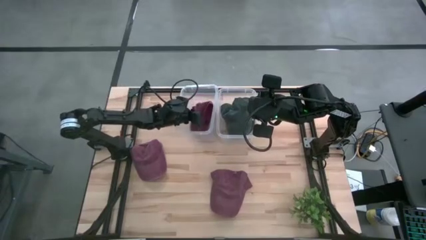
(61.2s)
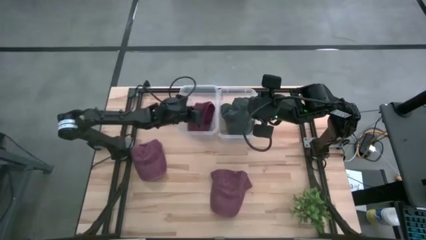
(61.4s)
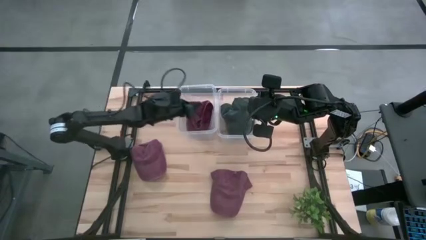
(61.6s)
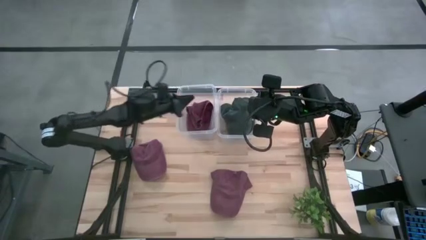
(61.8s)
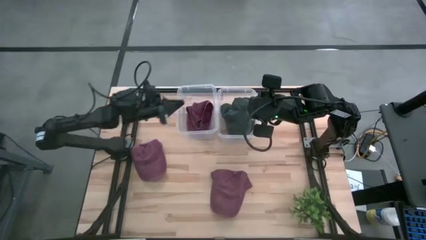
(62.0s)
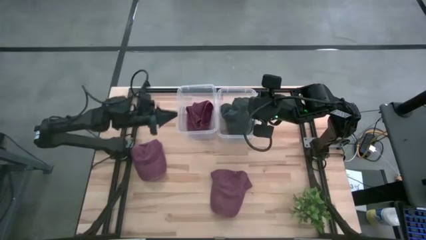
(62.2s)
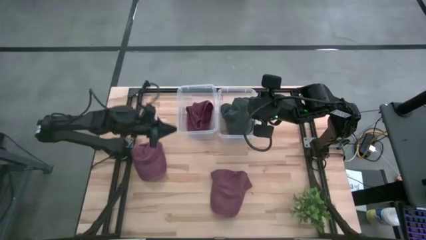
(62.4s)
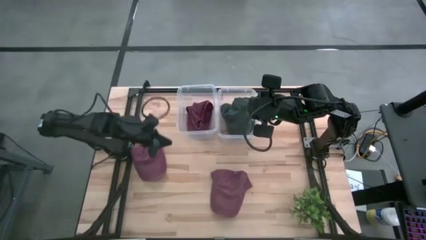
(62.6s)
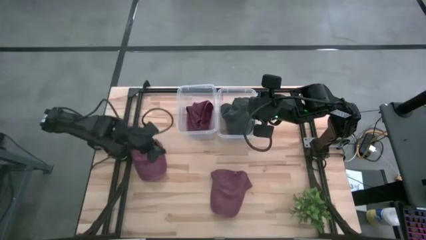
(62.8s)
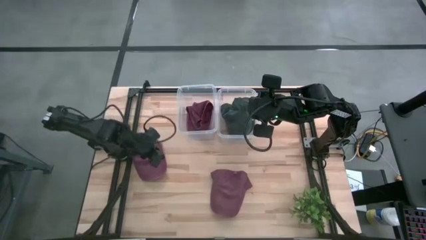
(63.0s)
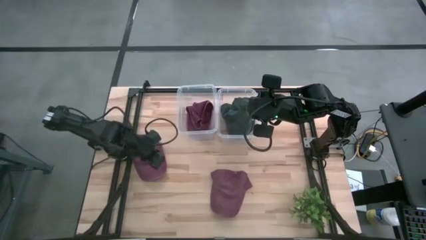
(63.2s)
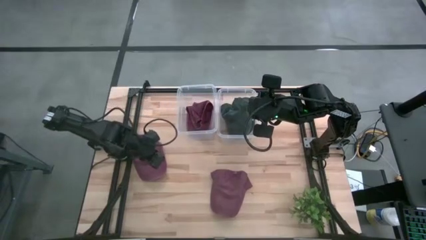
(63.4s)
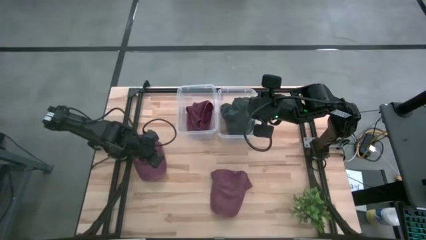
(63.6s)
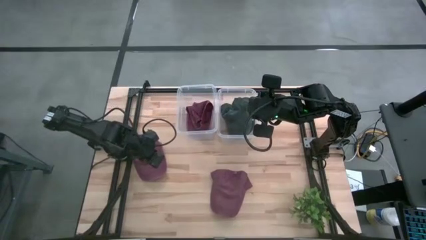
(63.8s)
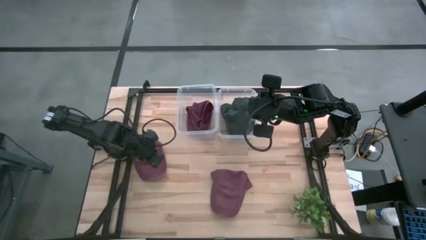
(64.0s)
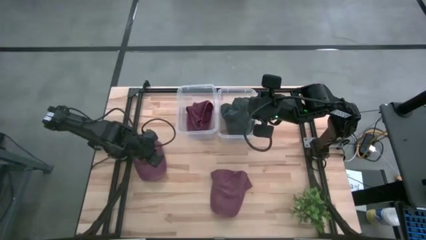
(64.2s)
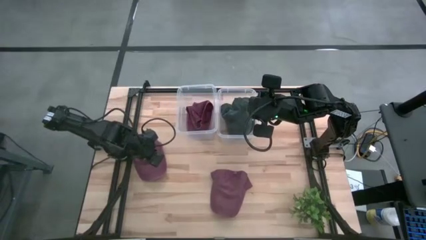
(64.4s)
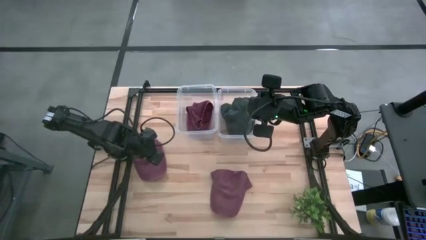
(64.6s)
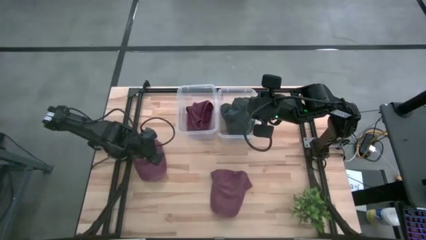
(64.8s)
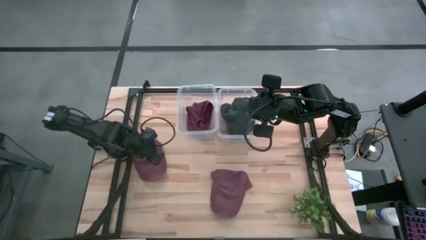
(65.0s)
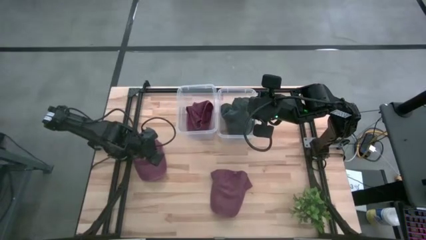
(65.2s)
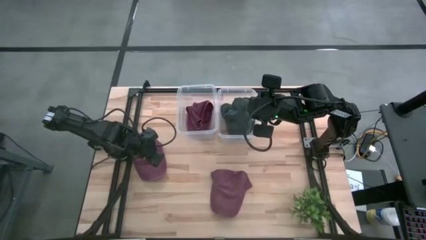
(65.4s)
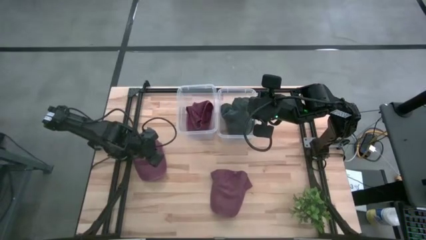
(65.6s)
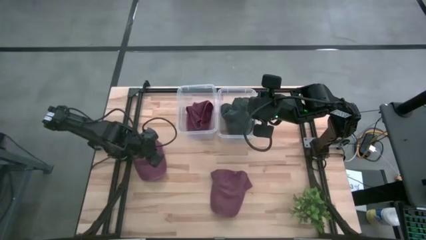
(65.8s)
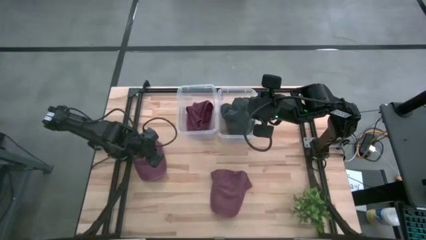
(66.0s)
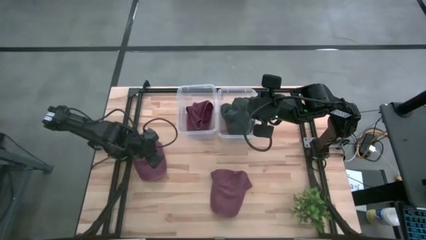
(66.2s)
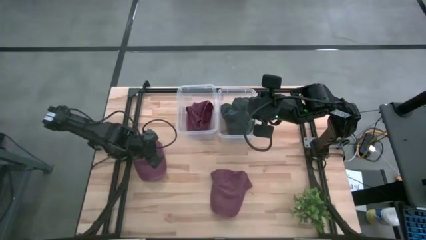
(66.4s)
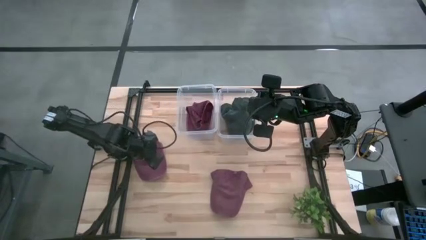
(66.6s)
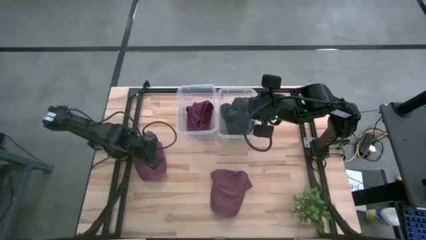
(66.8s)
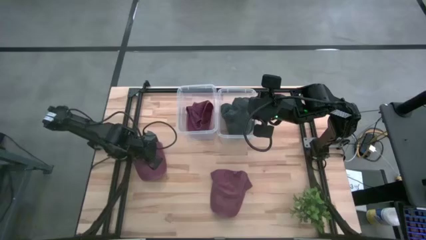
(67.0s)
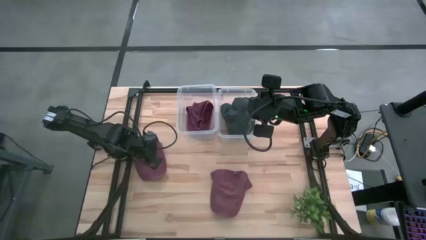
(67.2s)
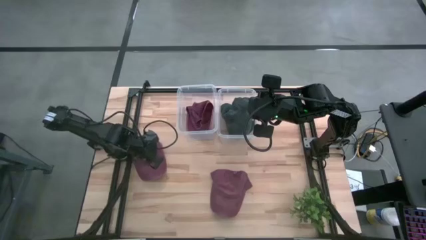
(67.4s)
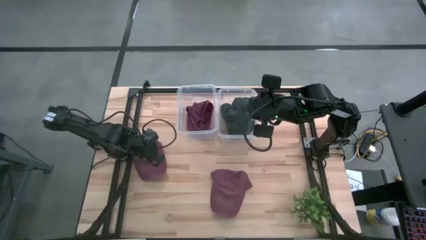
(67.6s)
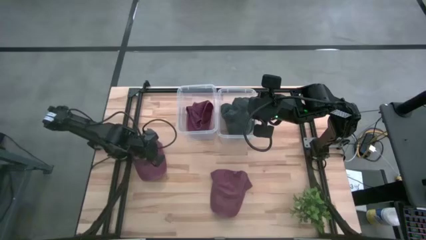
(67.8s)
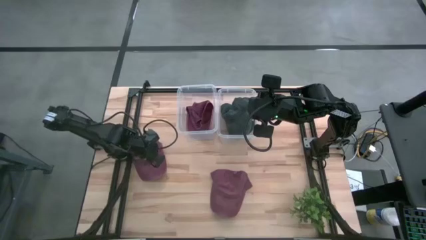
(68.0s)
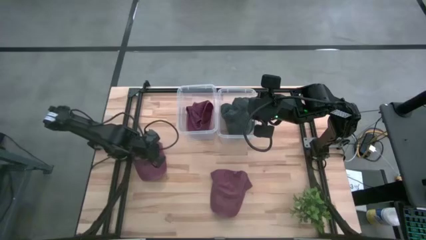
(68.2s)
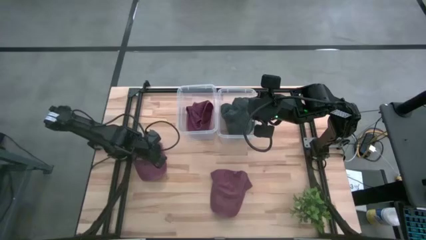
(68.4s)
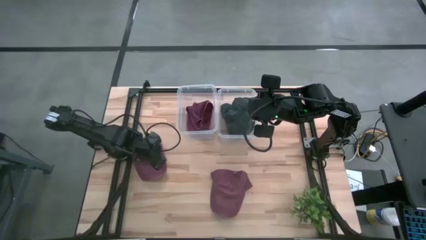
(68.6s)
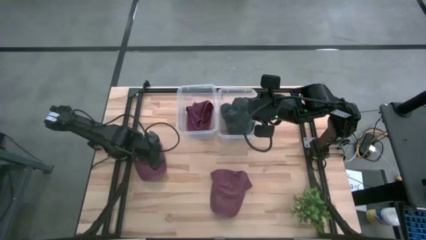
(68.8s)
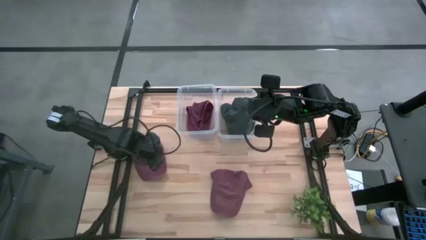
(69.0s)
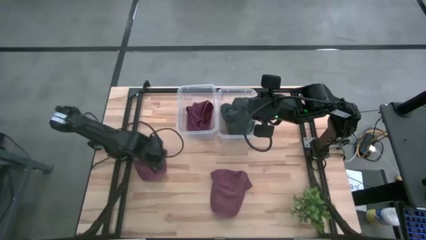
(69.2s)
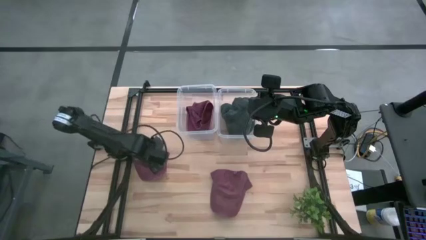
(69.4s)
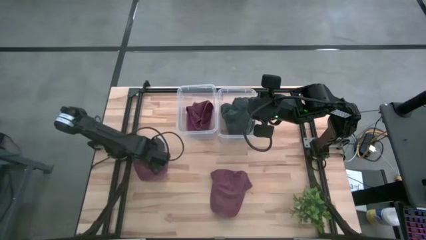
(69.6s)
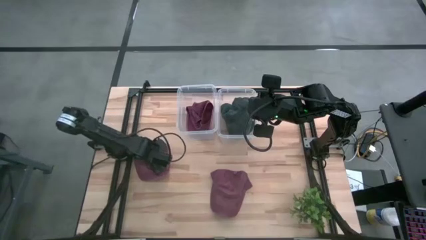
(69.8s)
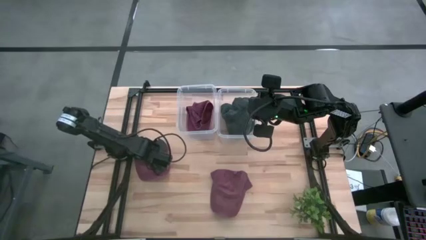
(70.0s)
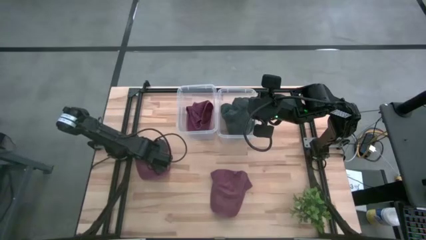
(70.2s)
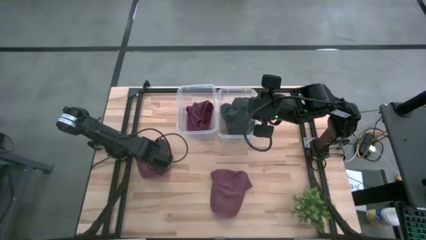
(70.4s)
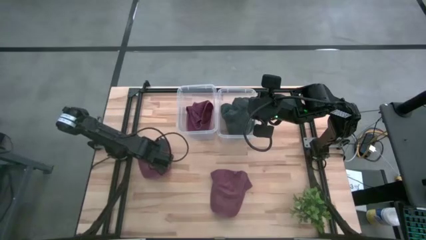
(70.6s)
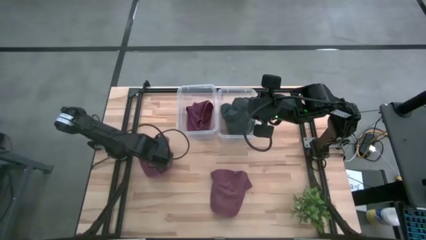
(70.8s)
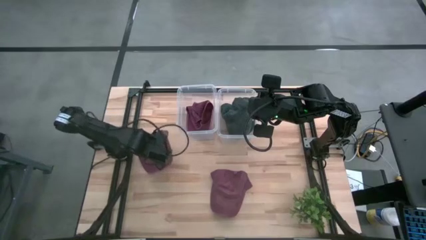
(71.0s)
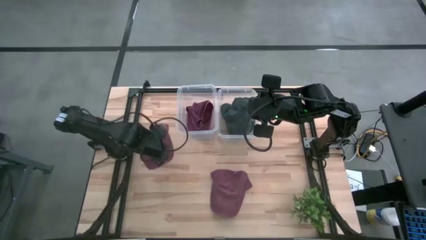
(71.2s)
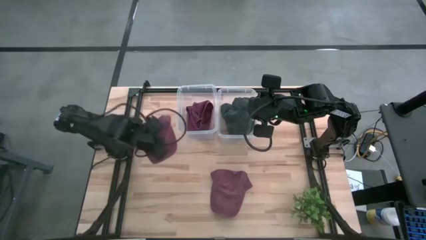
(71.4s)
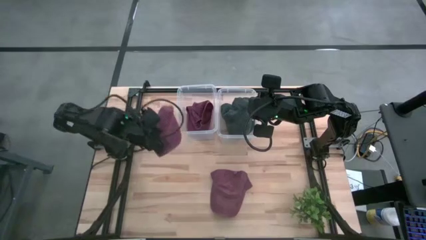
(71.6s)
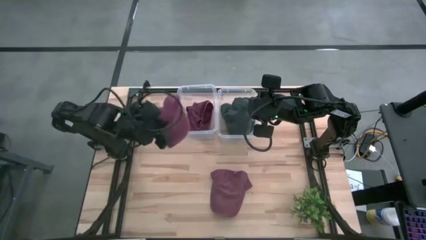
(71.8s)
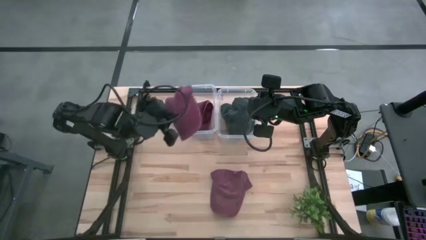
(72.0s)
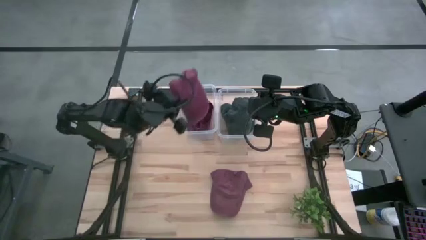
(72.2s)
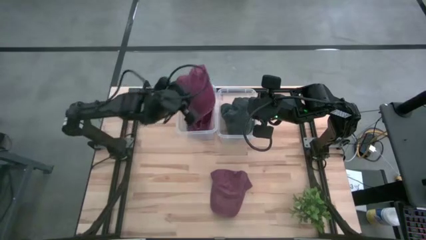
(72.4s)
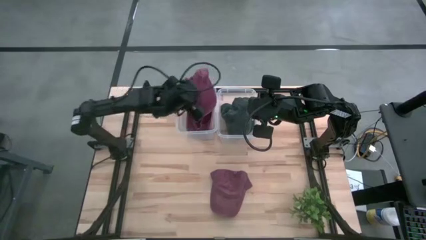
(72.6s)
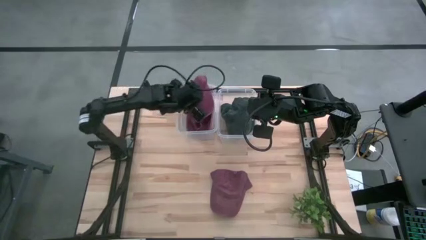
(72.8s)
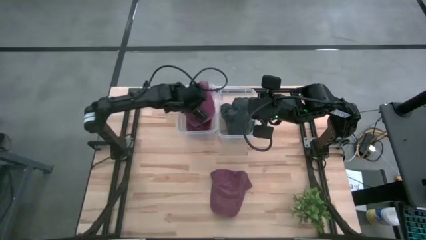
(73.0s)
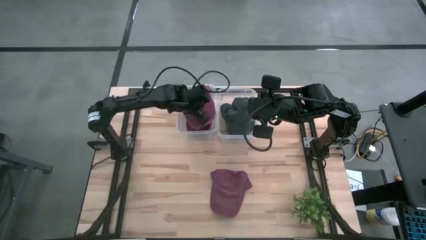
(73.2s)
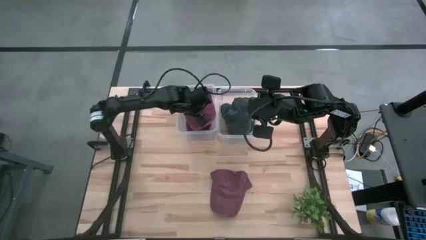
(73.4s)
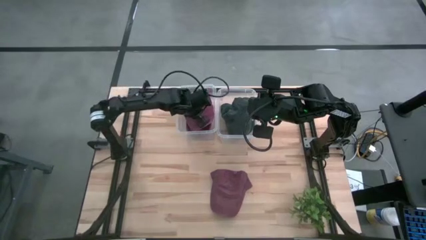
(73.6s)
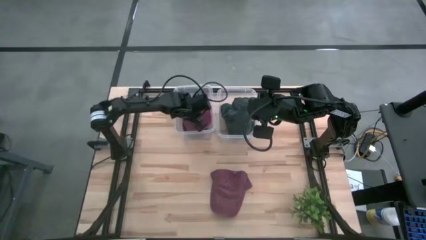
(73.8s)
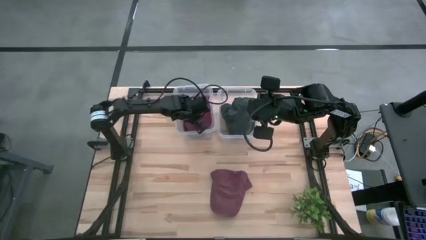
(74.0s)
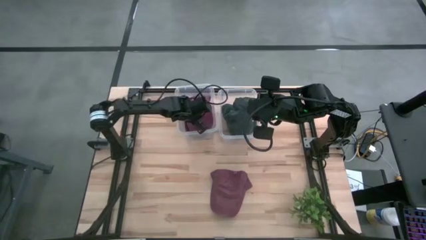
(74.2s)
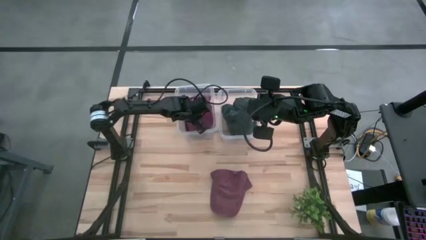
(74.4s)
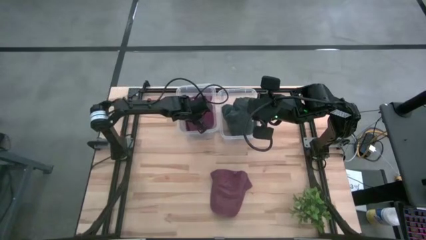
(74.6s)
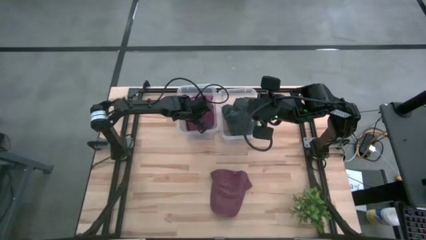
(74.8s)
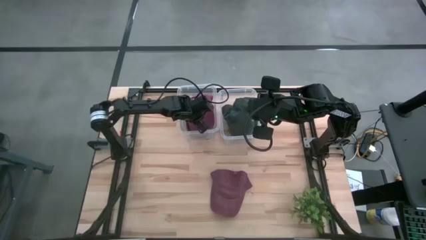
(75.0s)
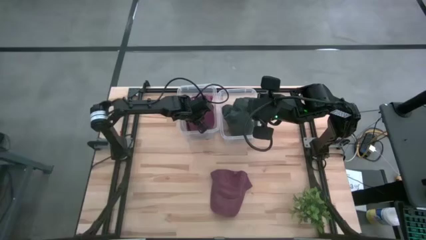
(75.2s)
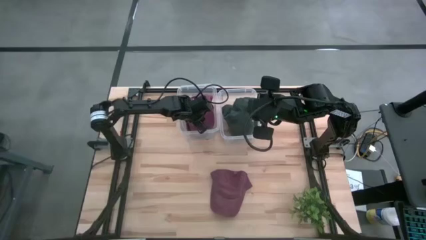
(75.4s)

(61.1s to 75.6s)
Task: Pick & Place hat
Put the left red cap into the left transparent bin

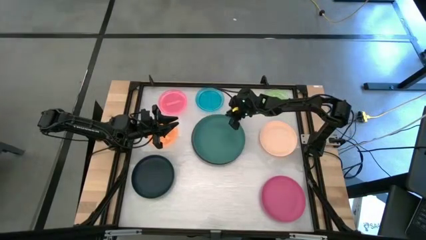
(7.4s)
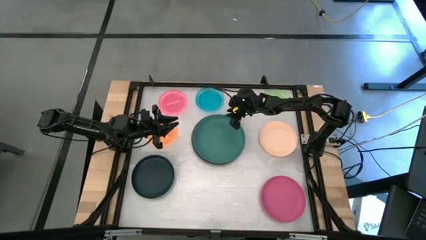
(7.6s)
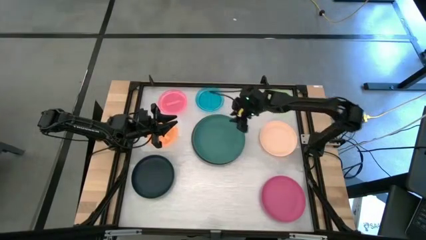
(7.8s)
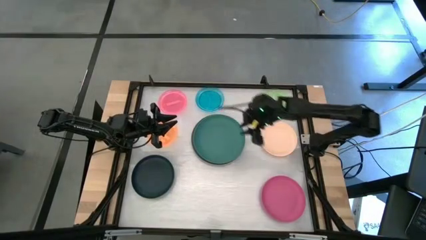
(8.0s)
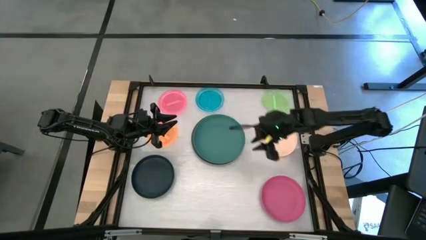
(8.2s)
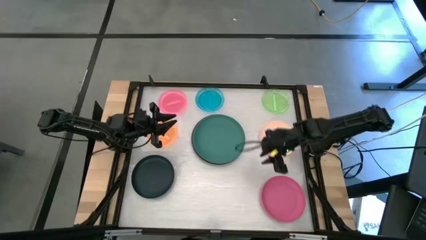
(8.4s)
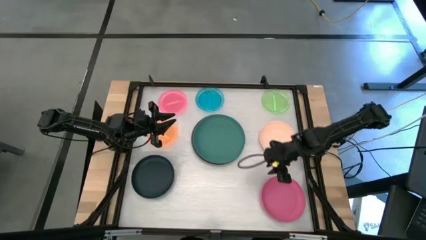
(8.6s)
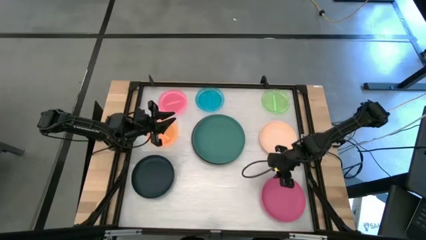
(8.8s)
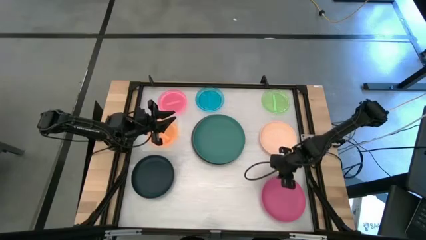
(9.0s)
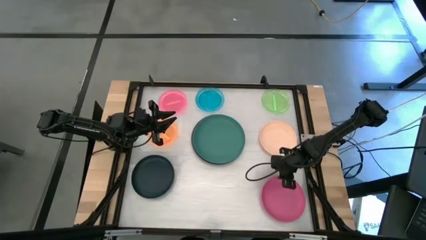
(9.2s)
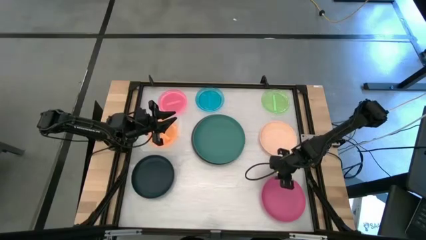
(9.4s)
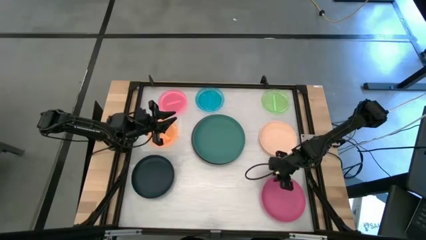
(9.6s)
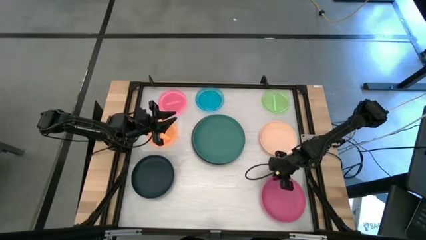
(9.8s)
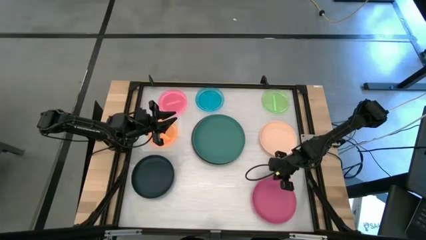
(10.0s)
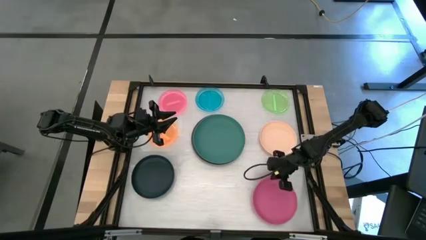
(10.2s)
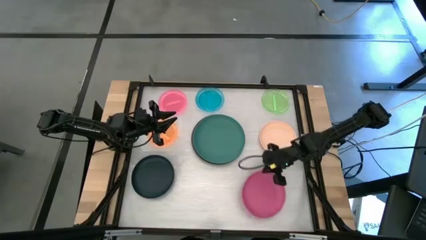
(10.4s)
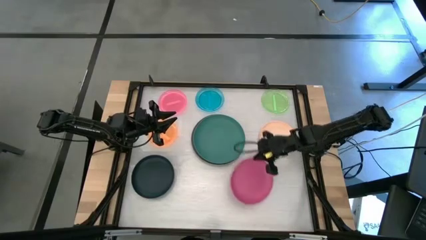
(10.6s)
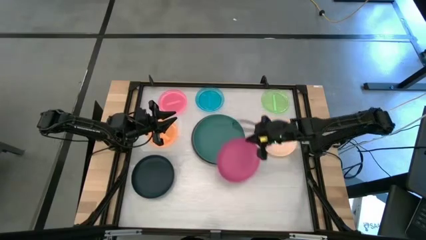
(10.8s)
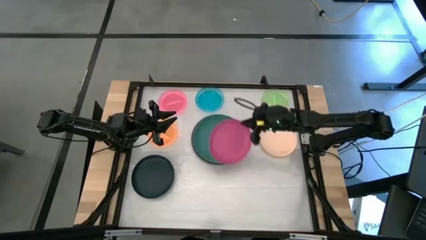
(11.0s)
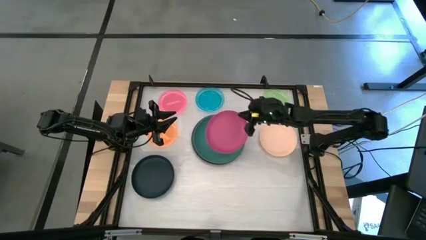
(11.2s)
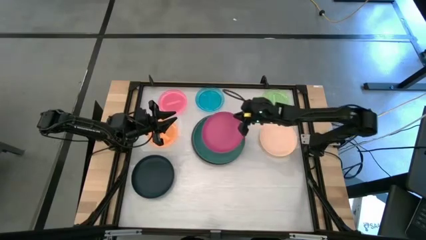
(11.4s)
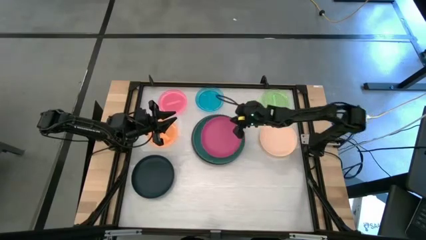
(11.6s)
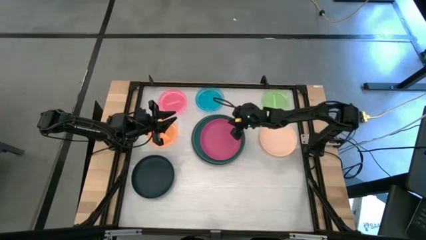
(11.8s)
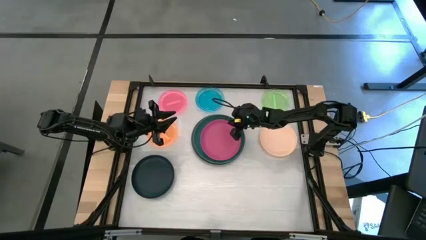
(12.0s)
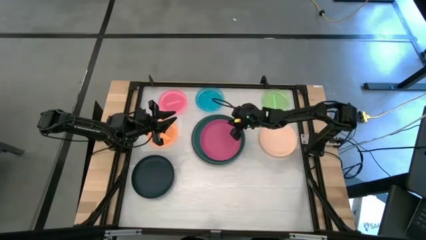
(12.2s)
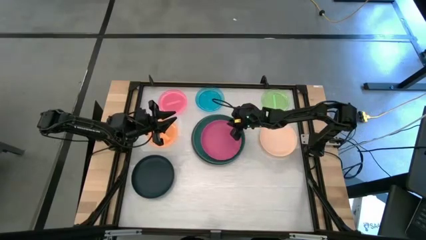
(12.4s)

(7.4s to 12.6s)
Task: Stack plastic plates
Stack the pink plate on top of the green plate
